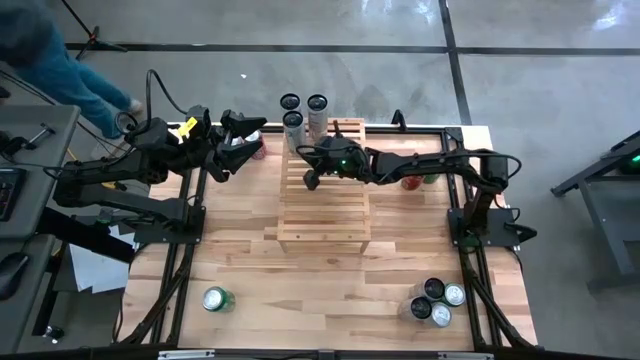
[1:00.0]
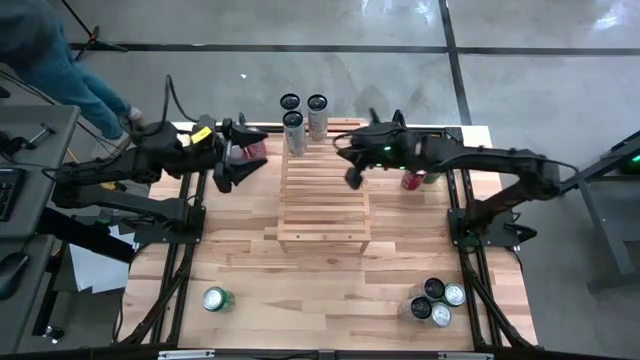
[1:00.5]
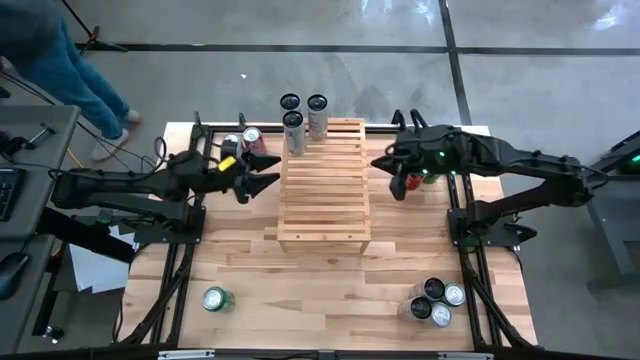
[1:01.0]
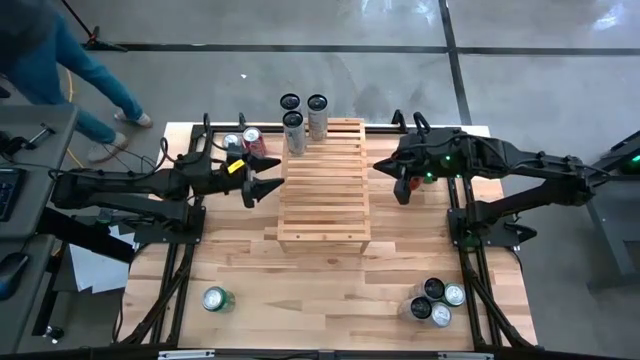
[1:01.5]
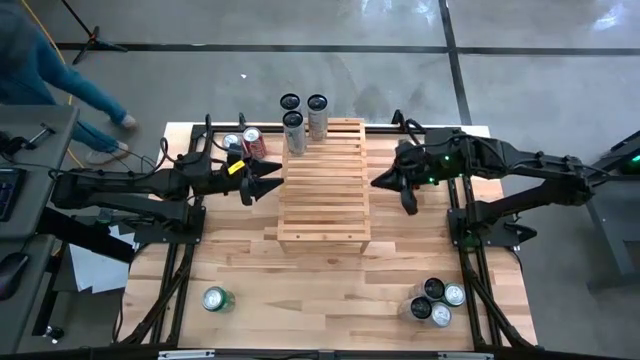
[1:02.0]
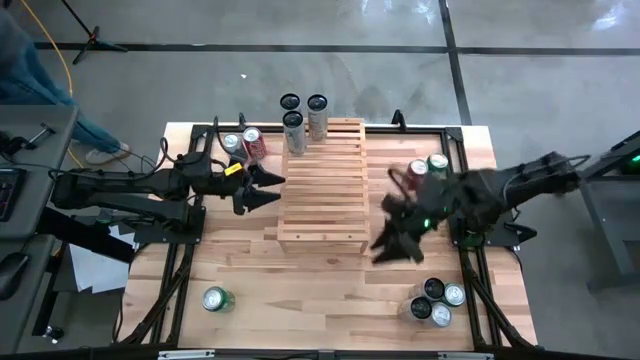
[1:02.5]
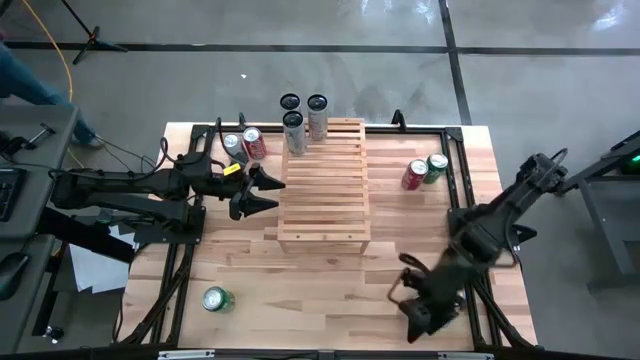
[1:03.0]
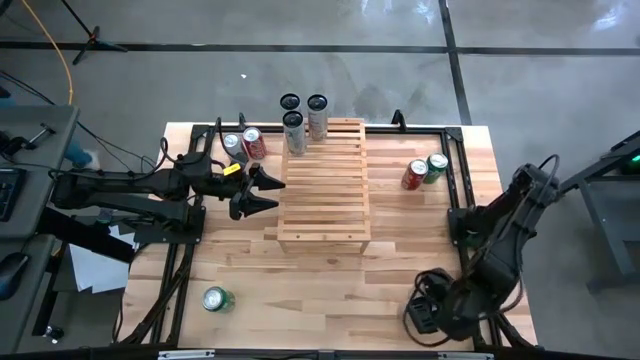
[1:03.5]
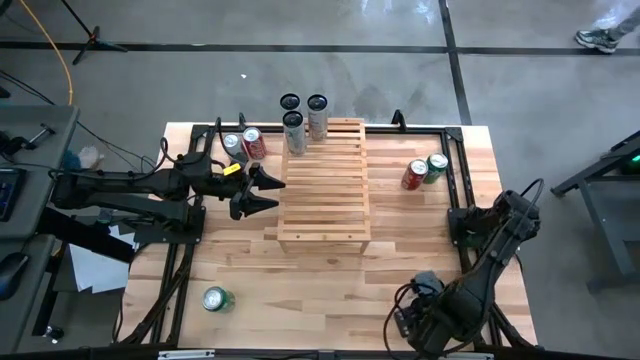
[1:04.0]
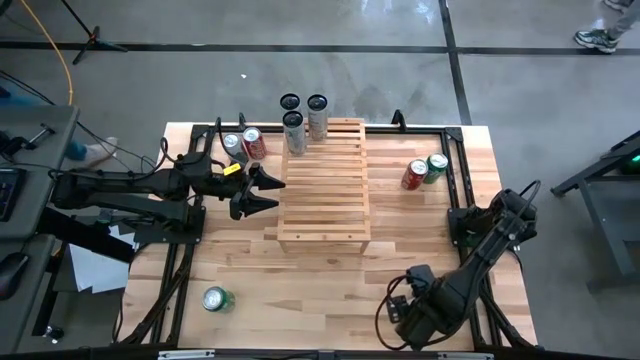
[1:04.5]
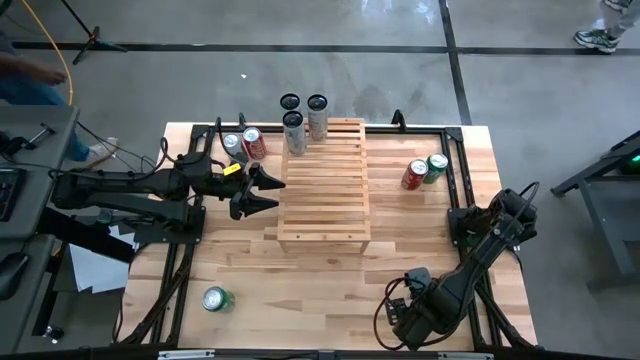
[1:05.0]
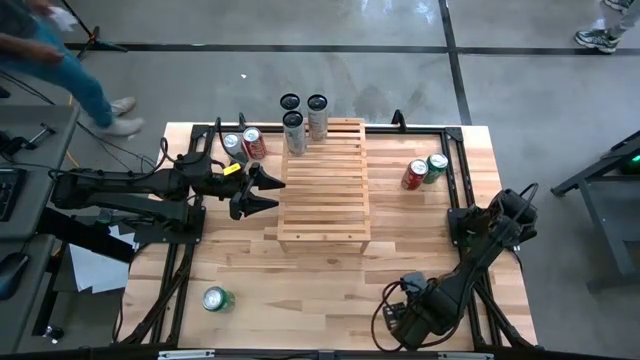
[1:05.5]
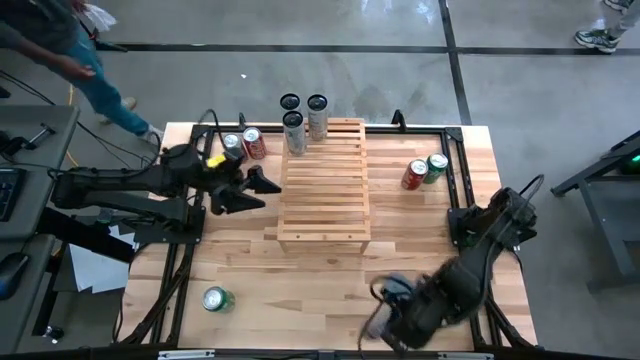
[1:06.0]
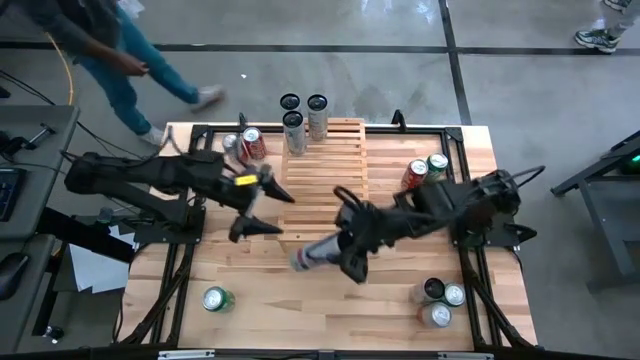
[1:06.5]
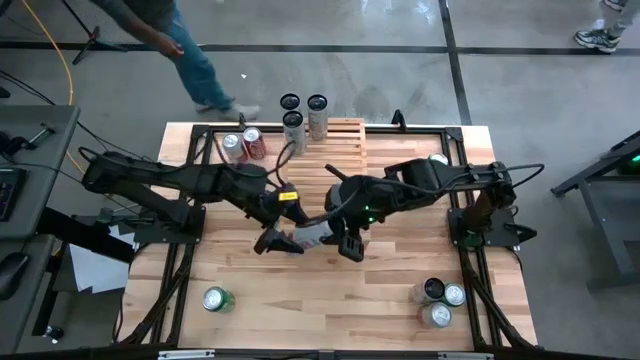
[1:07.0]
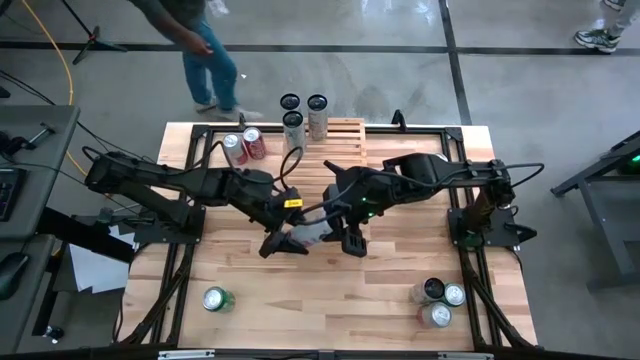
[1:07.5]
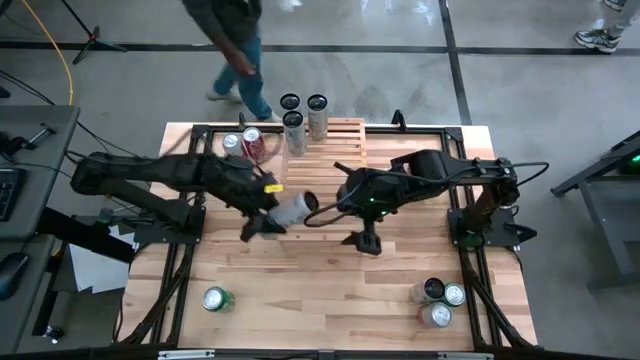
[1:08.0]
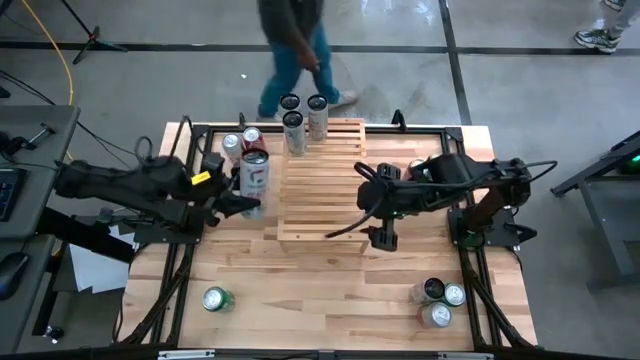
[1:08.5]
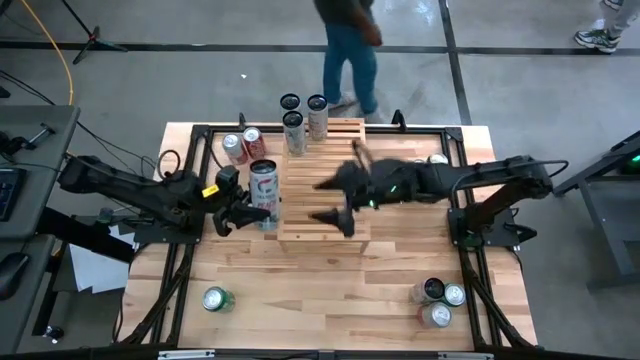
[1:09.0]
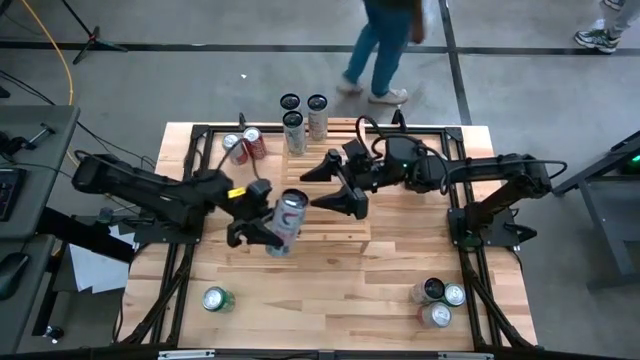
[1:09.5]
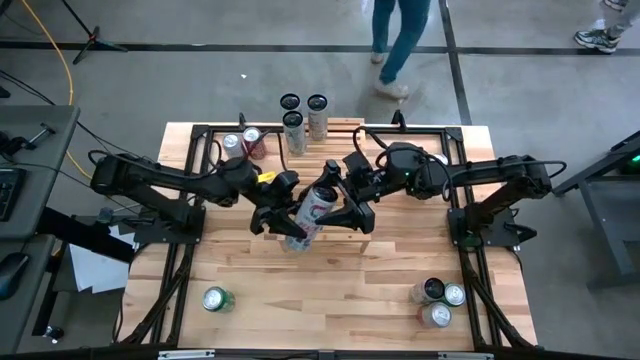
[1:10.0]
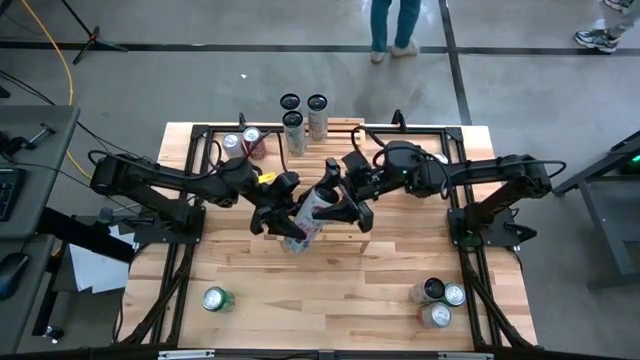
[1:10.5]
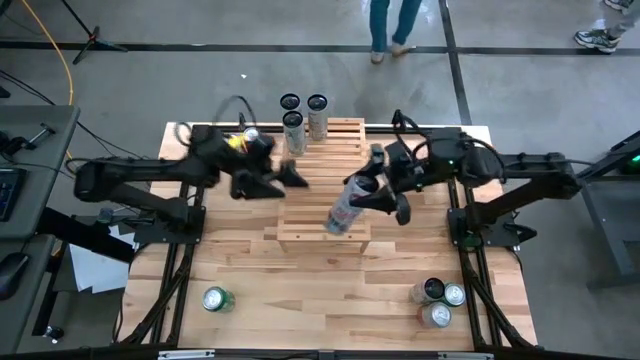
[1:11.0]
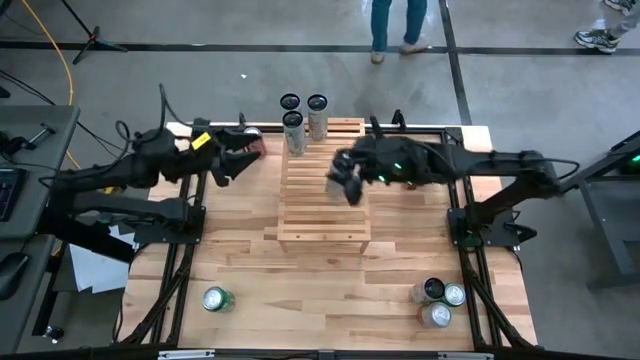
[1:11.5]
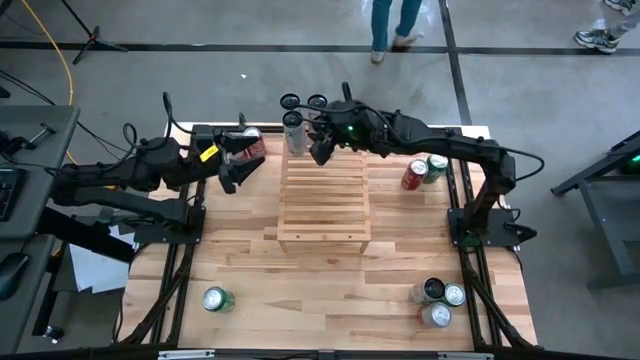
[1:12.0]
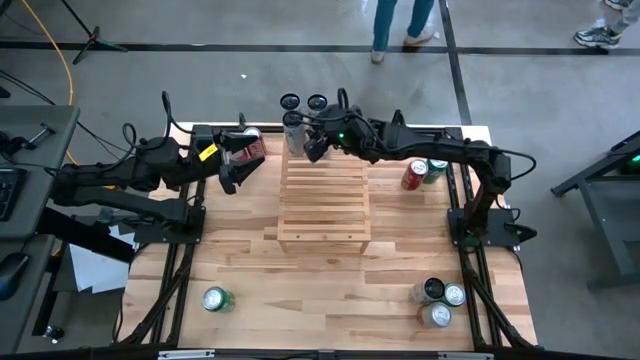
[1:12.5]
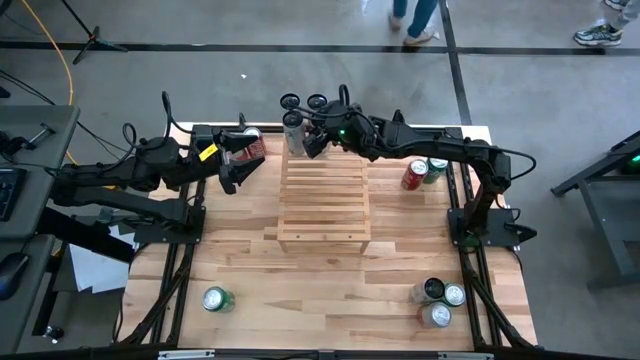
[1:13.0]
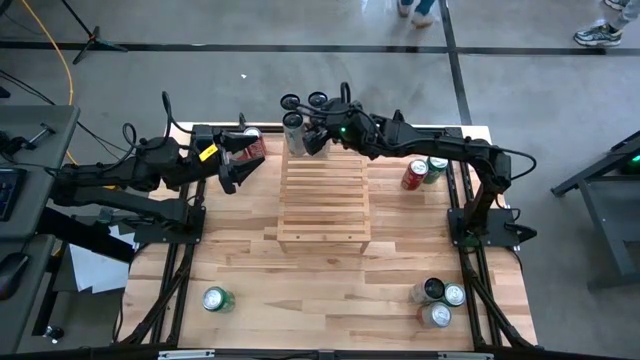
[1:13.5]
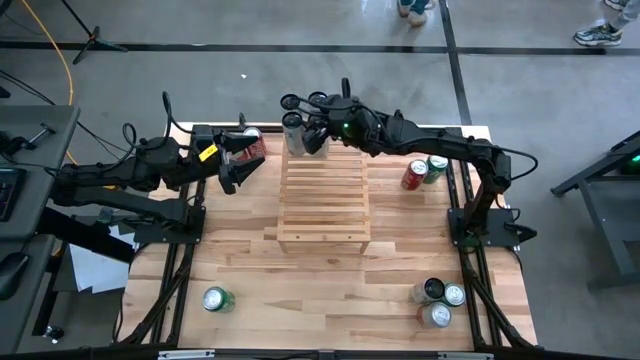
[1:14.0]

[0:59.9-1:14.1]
Task: Place canned beverage on shelf
Put the white pink soda can on the shelf aligned with the other white pink soda can

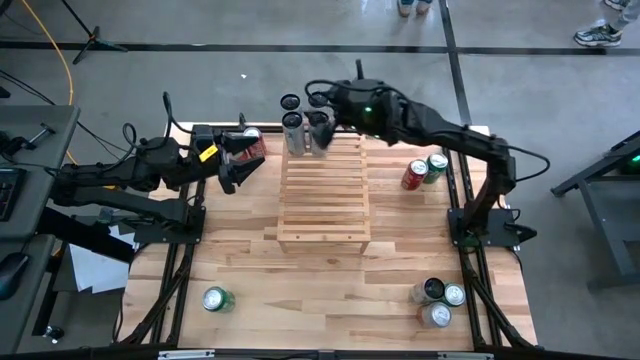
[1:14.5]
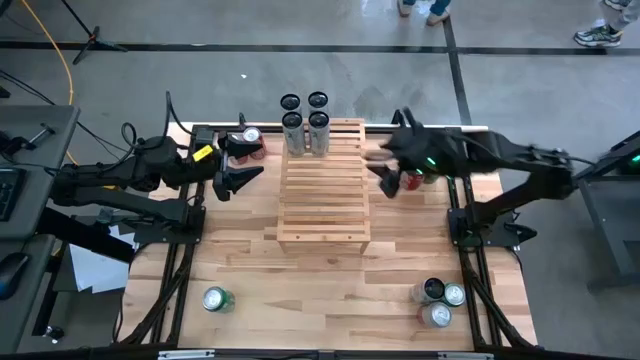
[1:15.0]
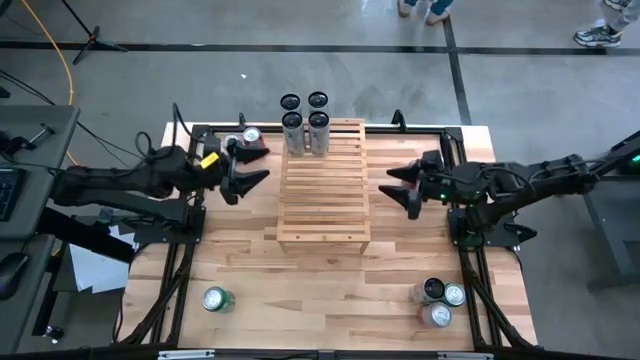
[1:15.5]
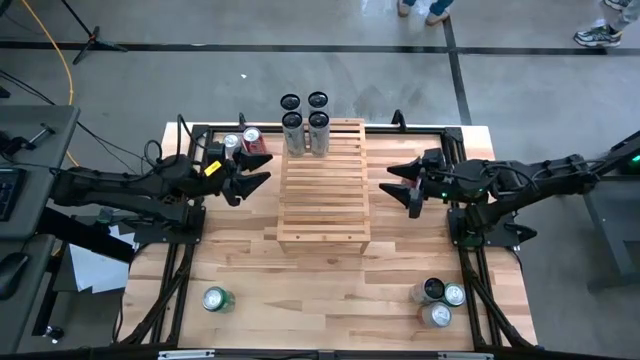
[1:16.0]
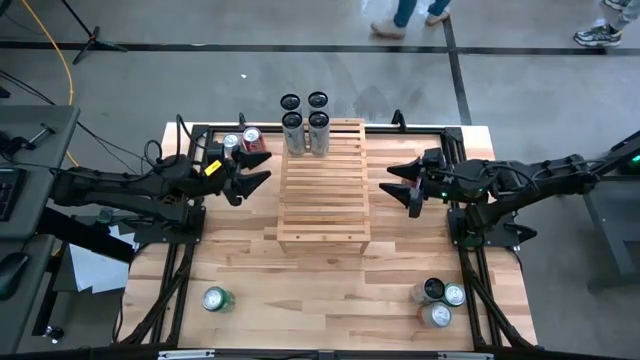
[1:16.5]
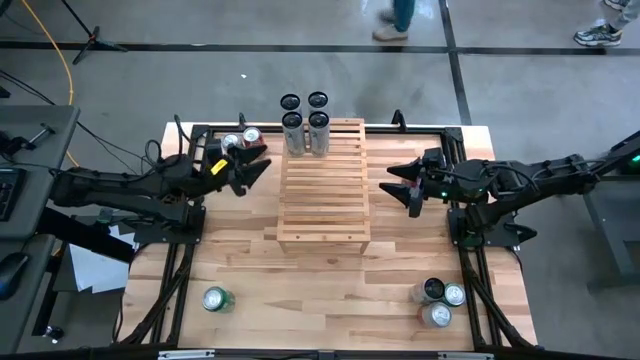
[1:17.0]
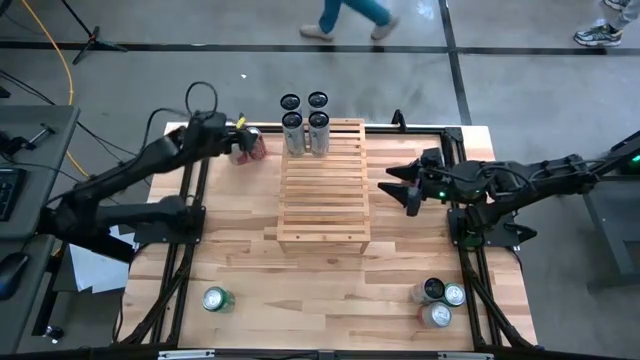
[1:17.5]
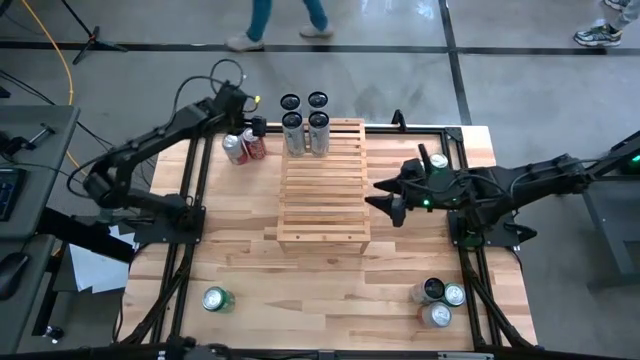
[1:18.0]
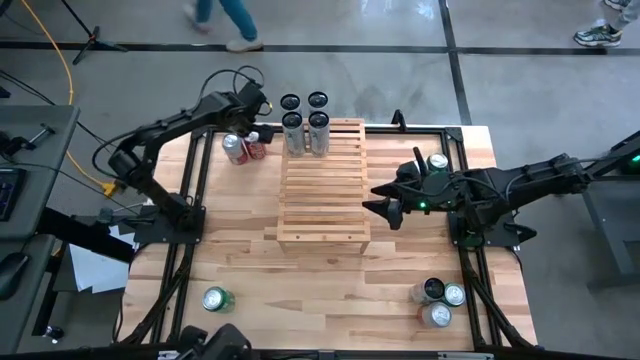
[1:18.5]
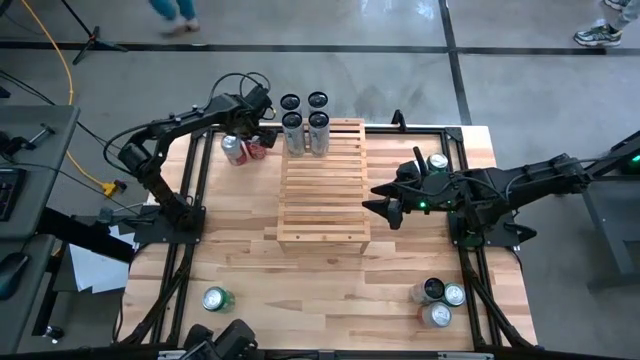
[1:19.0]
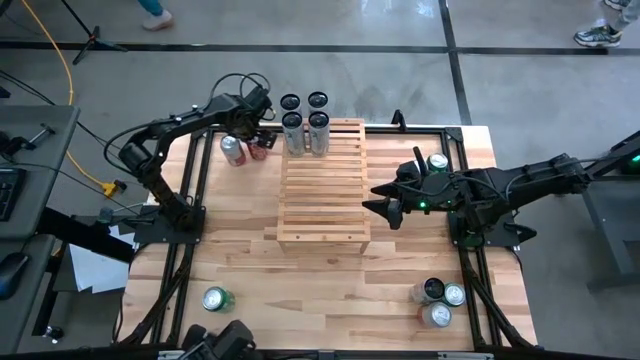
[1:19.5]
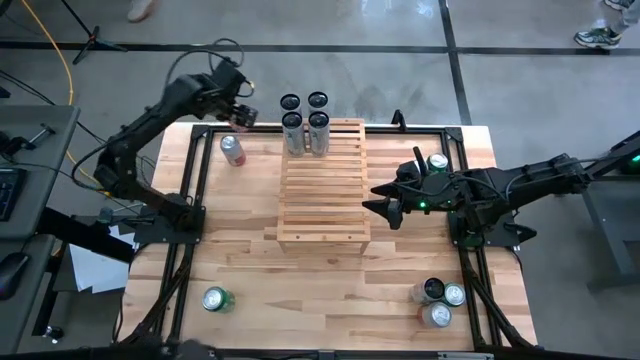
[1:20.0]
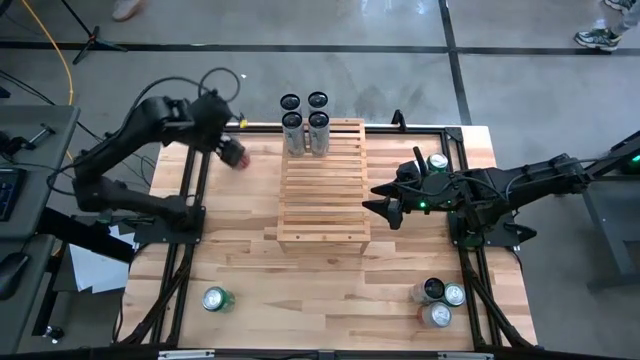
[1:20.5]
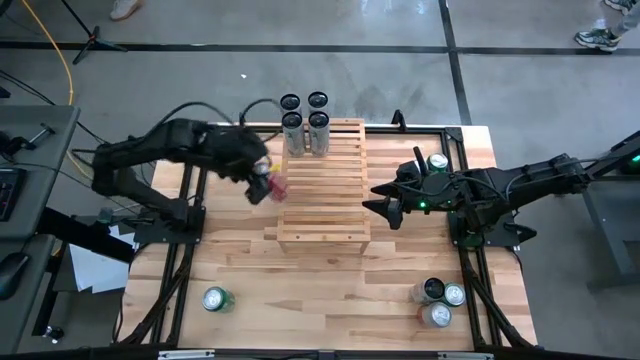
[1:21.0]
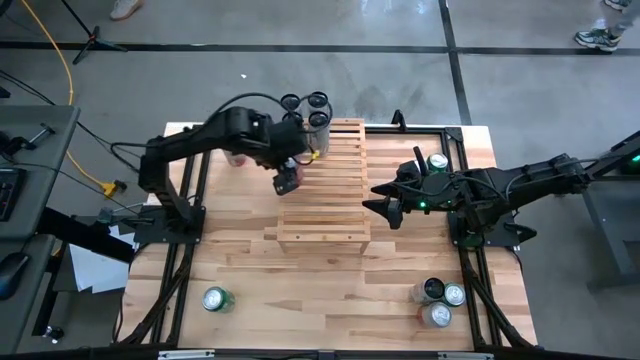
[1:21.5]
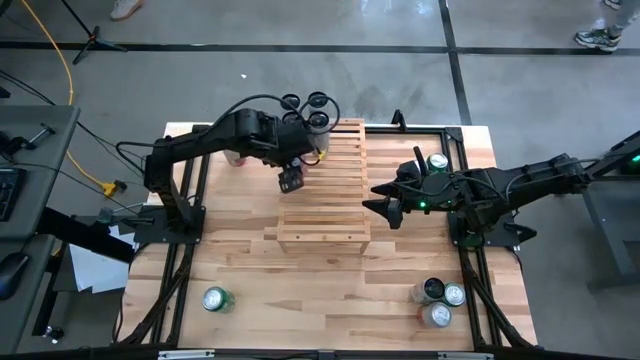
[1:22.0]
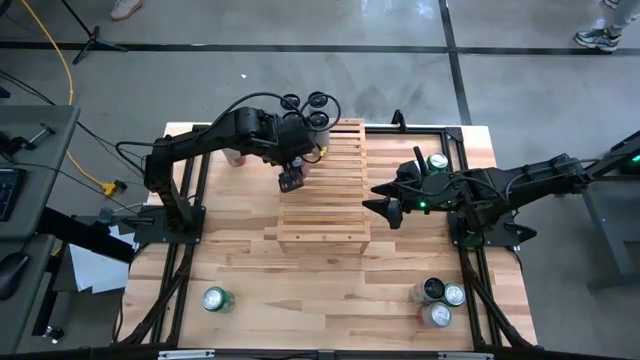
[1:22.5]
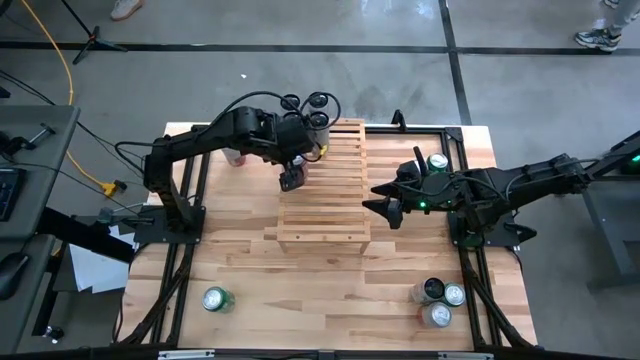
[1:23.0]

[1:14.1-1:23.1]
Put the left red soda can on the shelf
